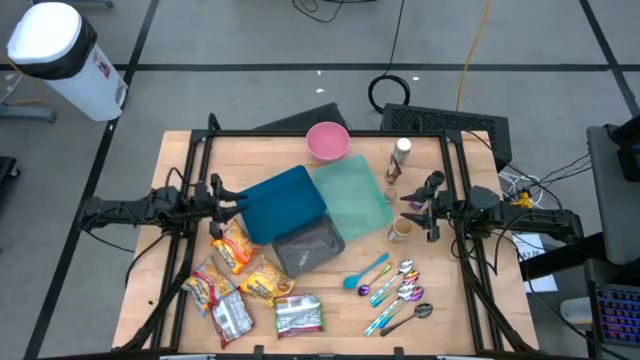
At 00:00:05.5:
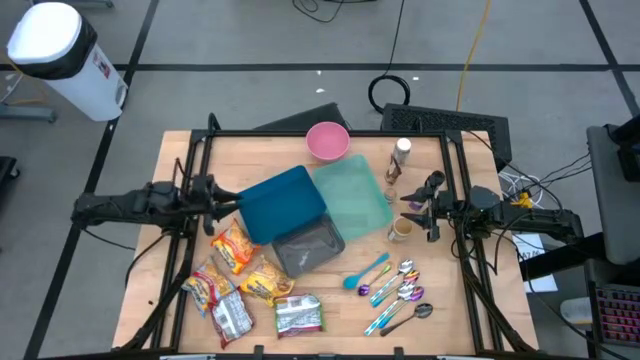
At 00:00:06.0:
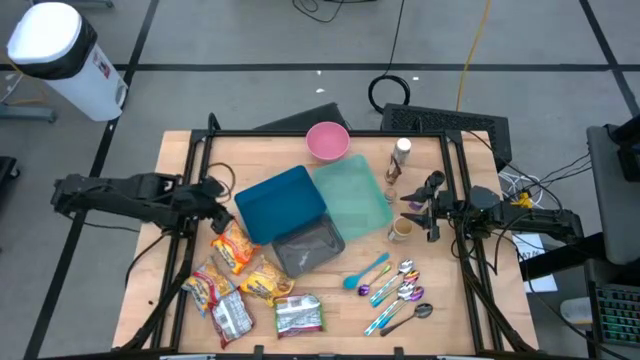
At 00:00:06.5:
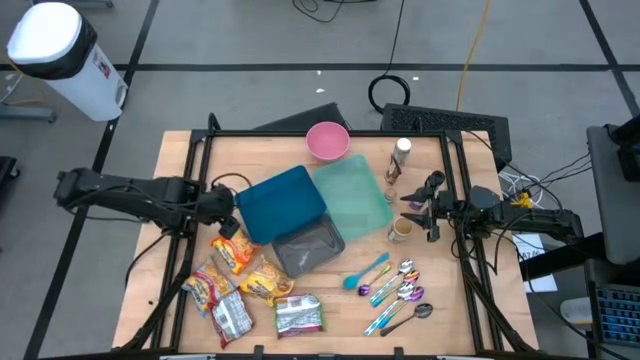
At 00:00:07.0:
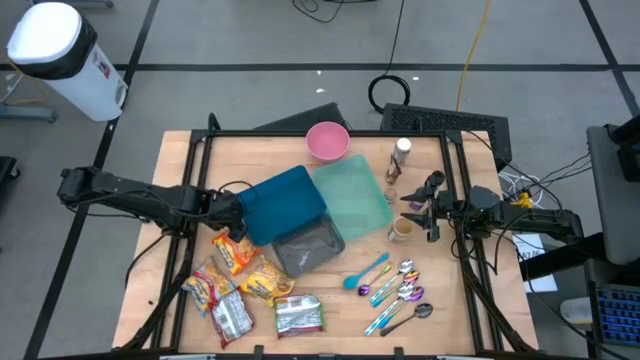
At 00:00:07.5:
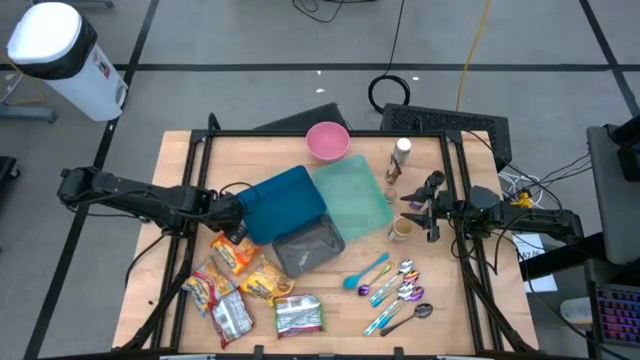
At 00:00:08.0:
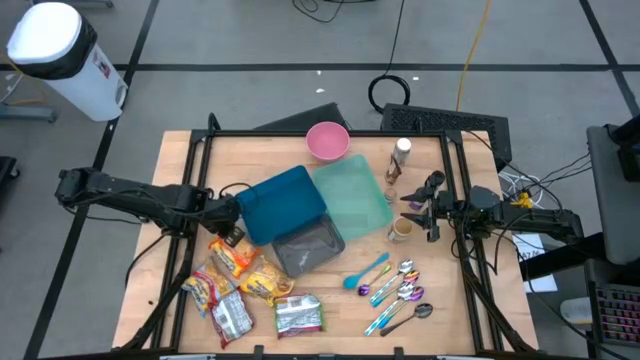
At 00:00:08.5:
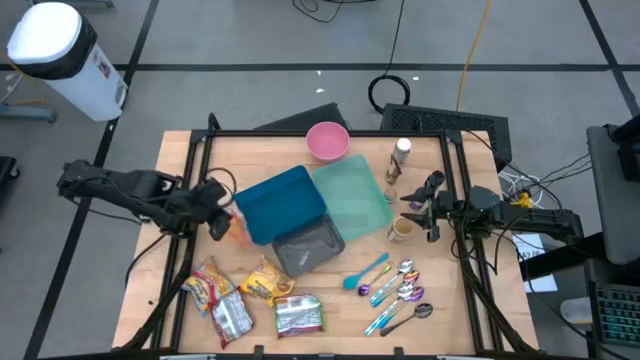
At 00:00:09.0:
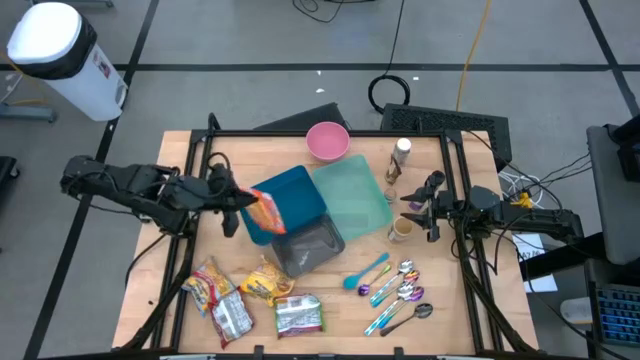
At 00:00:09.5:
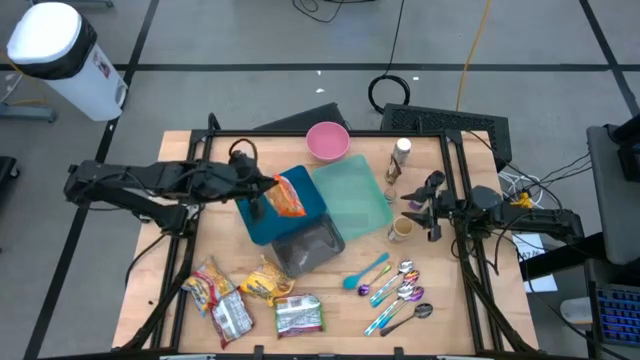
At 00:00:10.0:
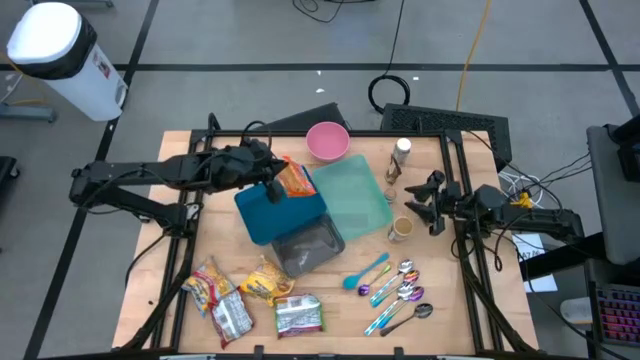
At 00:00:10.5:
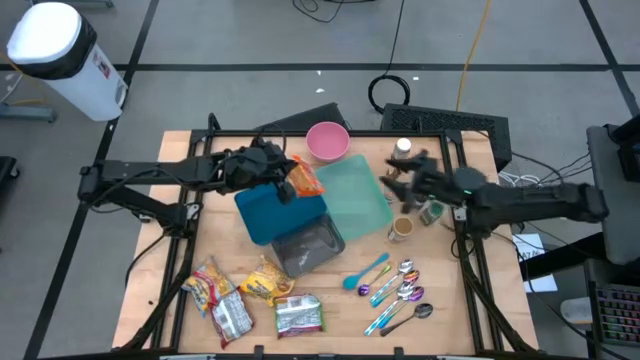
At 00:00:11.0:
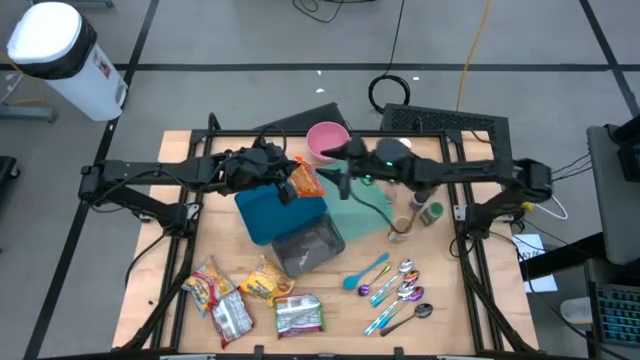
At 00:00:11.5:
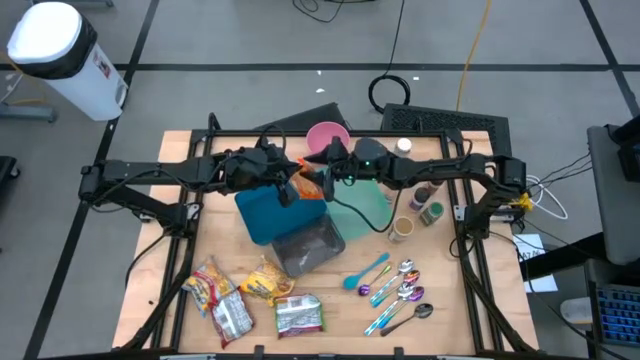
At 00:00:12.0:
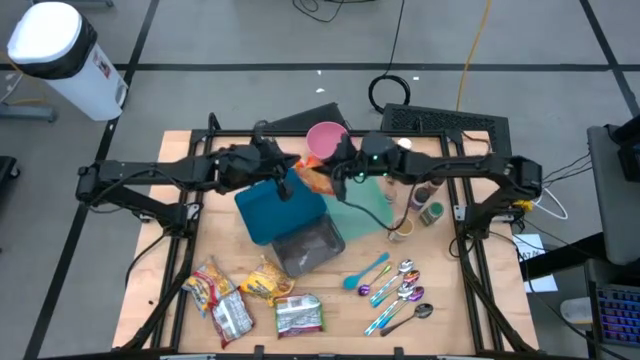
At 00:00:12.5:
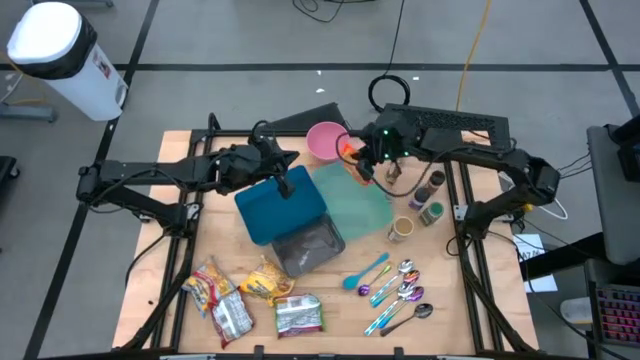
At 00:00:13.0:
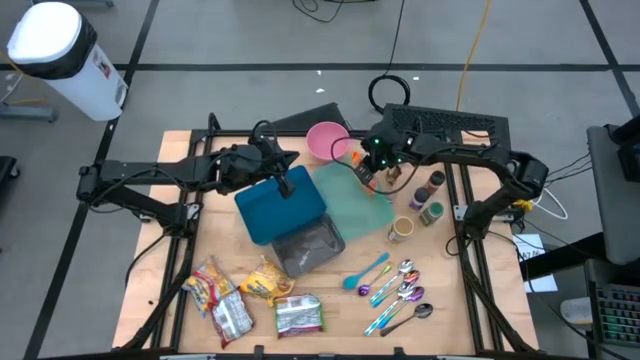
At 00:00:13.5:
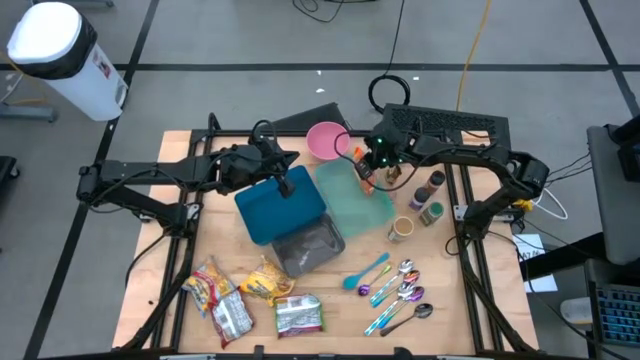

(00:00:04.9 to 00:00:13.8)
Task: Pick & Place Food Item
Put the orange noodle pack into the green bin

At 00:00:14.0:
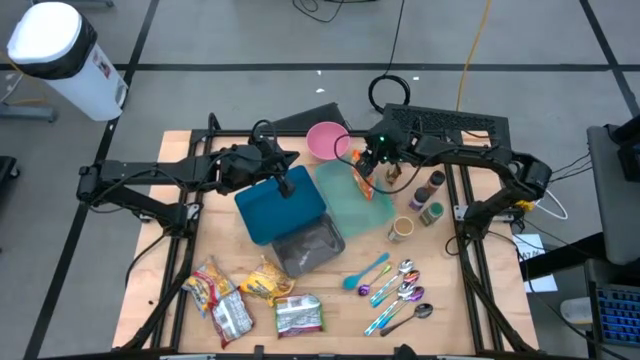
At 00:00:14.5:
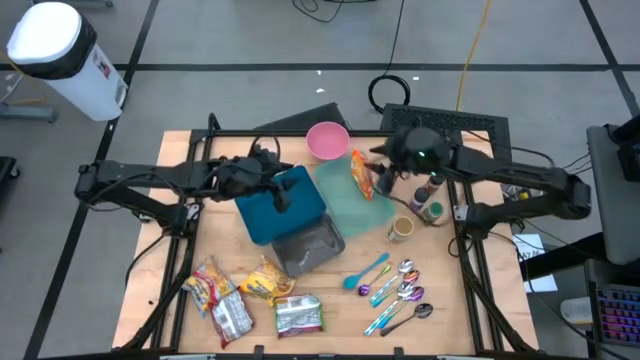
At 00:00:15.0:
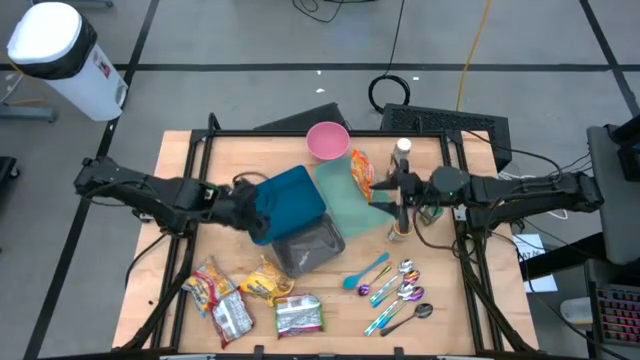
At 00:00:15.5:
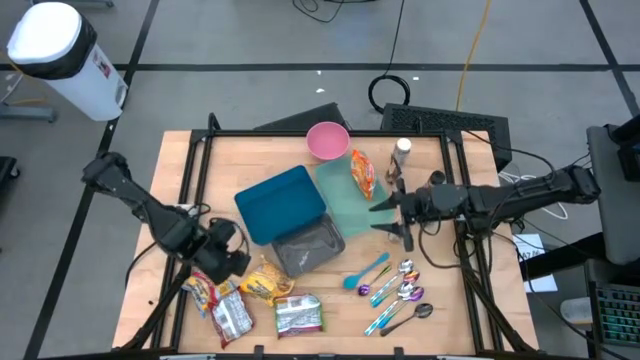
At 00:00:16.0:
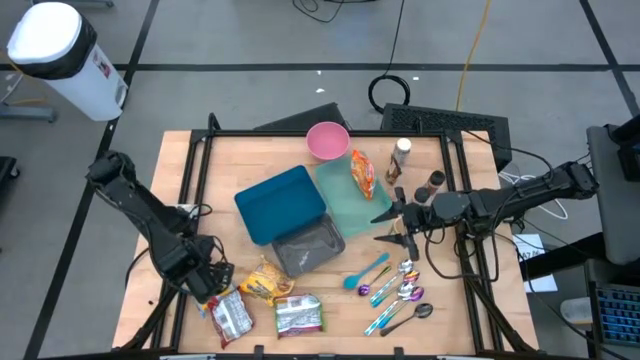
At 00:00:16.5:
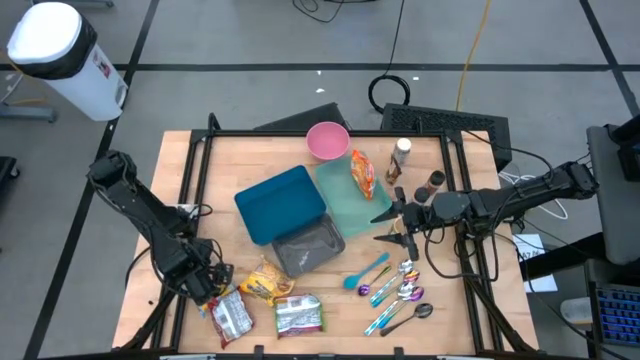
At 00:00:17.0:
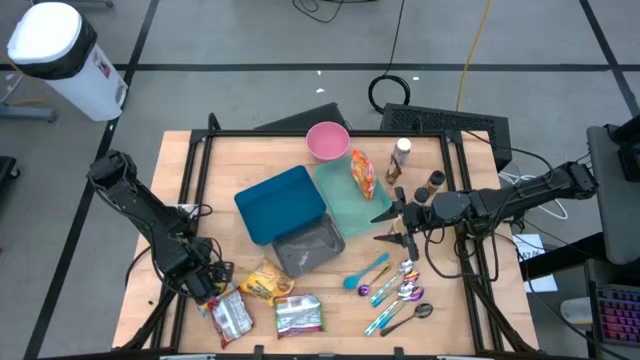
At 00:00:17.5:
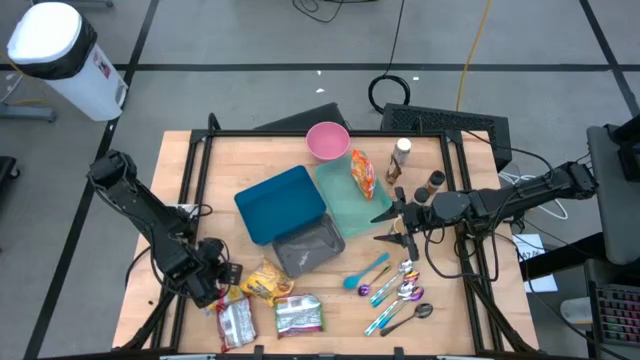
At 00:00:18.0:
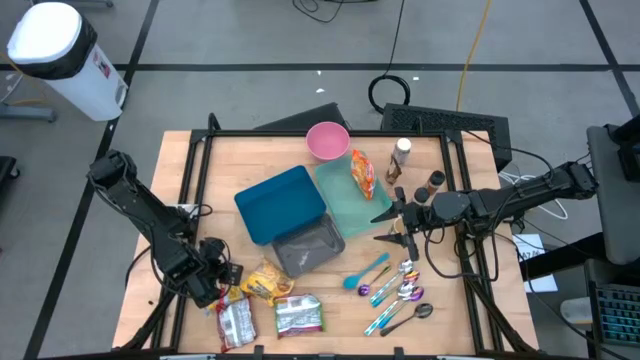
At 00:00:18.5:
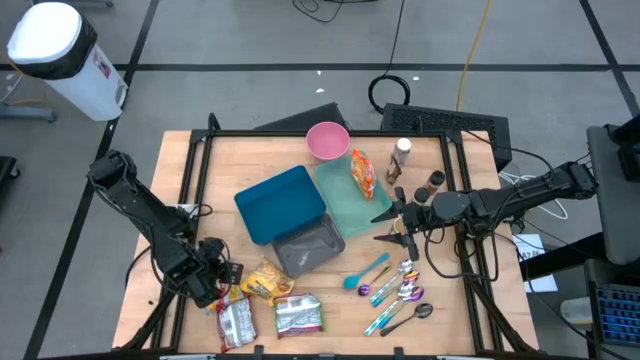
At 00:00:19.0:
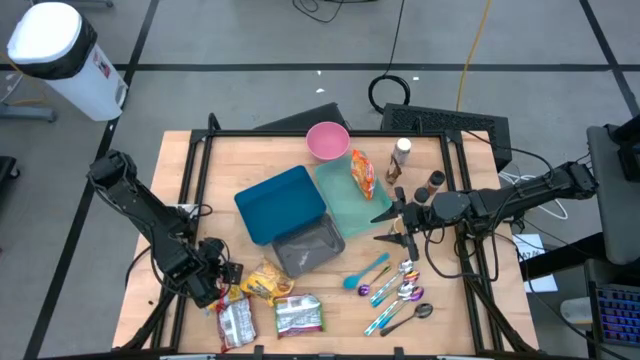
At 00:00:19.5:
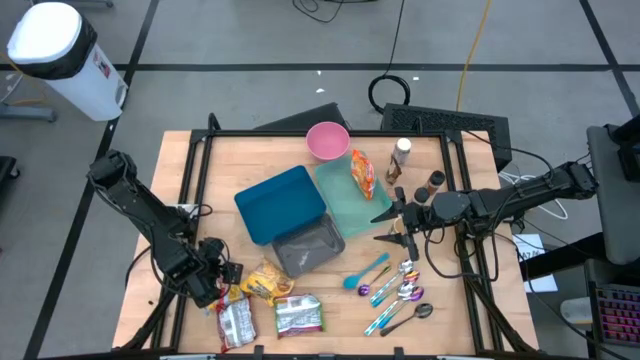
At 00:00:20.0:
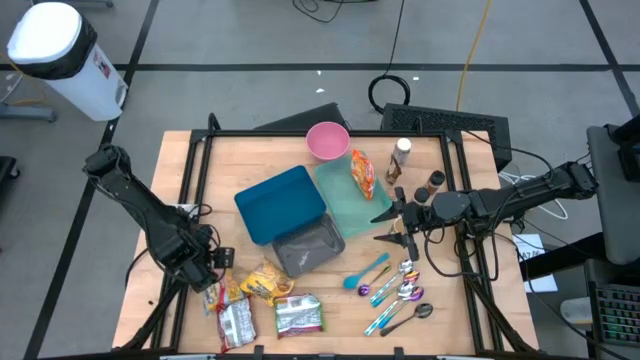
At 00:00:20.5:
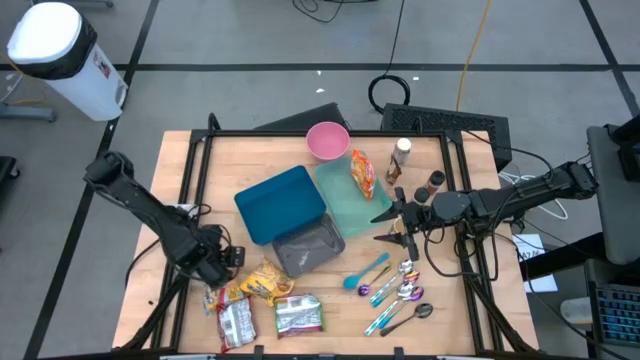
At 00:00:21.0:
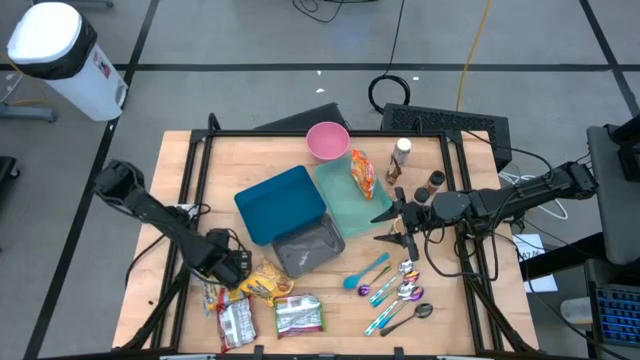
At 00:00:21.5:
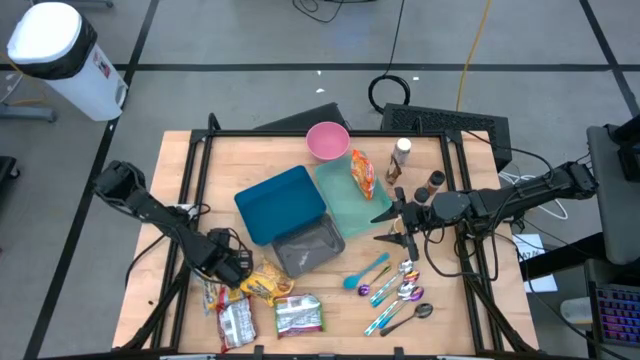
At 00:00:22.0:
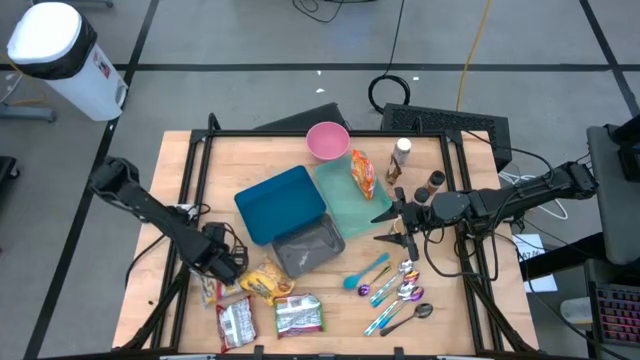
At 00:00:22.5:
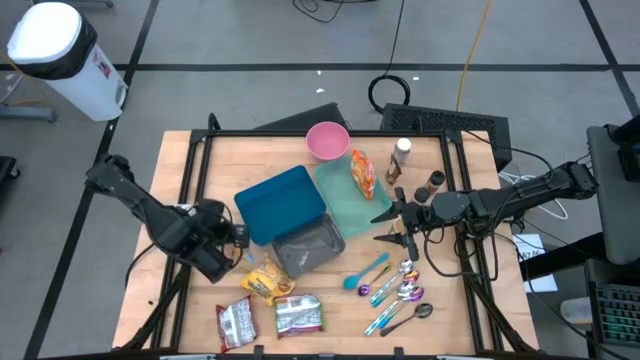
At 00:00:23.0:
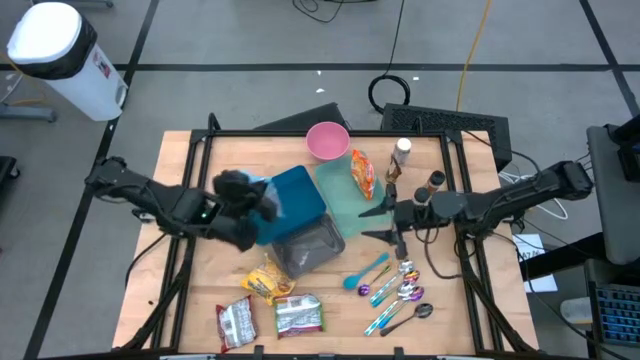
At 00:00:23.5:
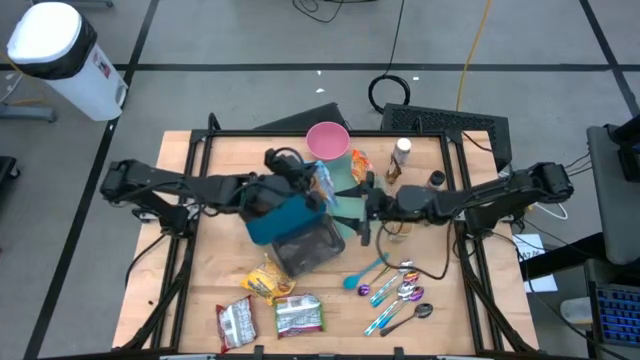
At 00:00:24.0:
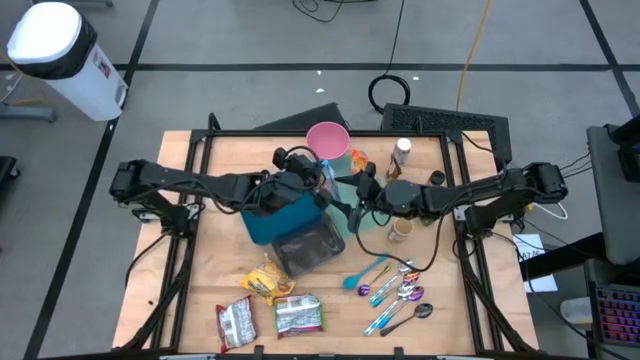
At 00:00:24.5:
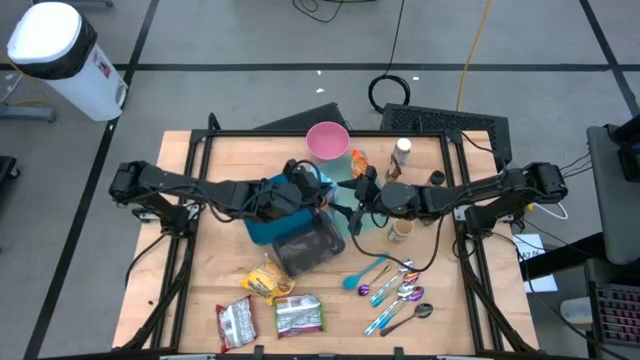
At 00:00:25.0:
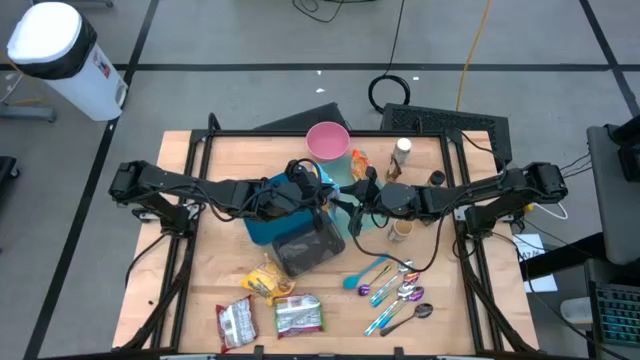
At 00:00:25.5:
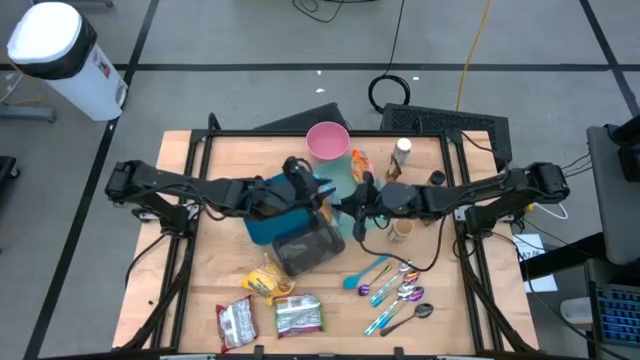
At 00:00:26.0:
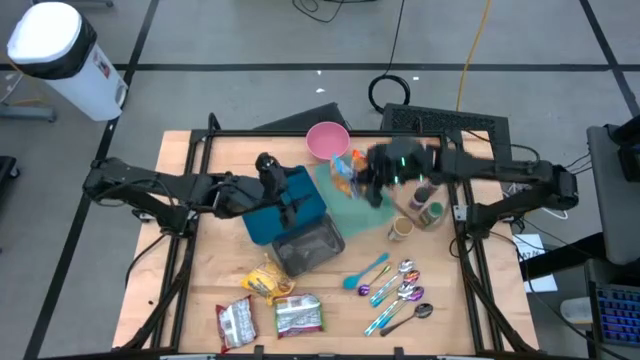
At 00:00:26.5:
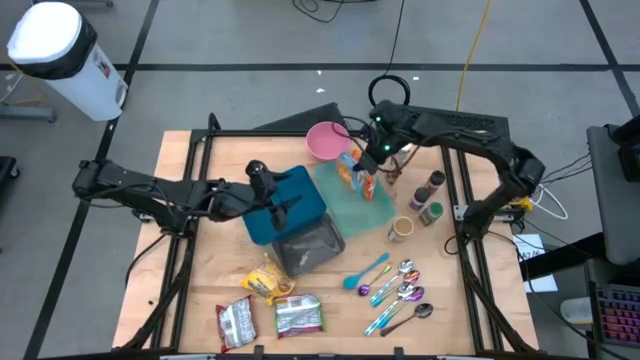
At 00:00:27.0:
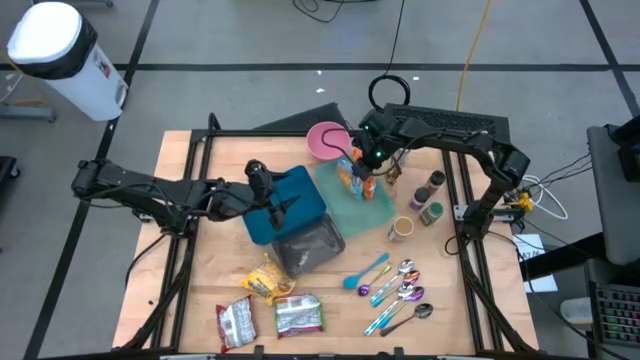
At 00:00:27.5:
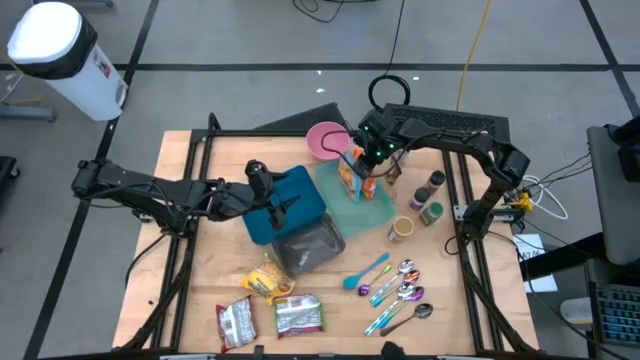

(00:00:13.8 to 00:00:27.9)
Put the blue noodle pack into the green bin
